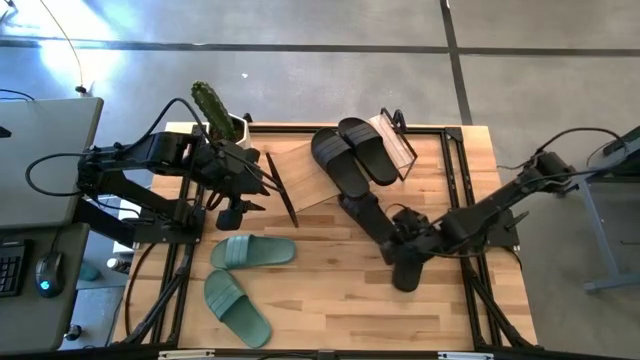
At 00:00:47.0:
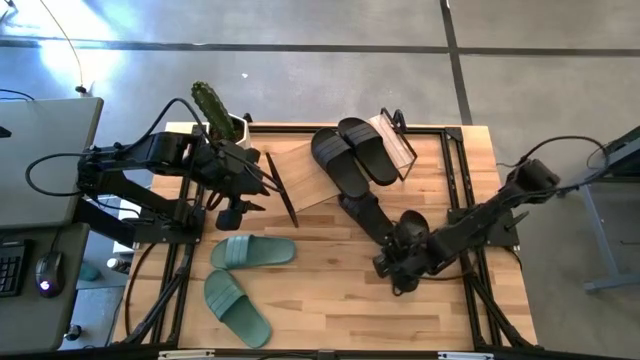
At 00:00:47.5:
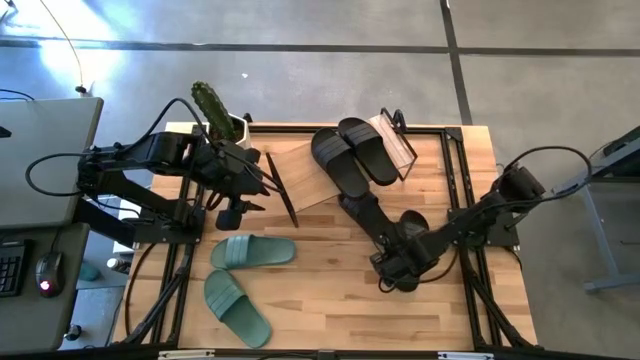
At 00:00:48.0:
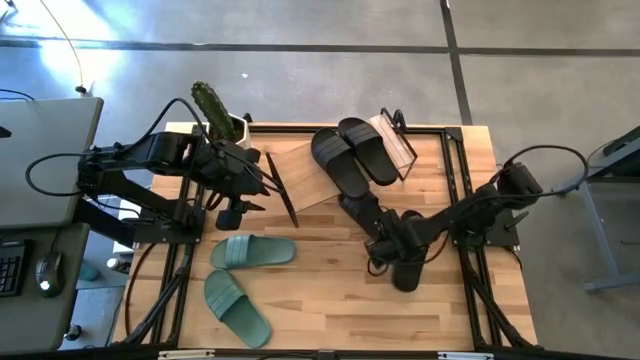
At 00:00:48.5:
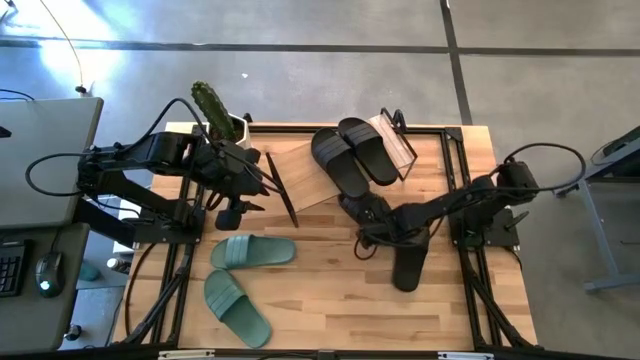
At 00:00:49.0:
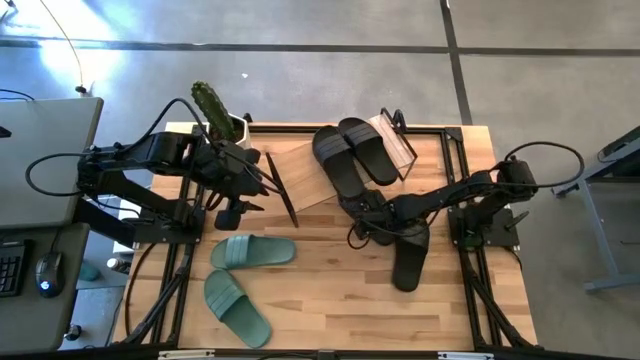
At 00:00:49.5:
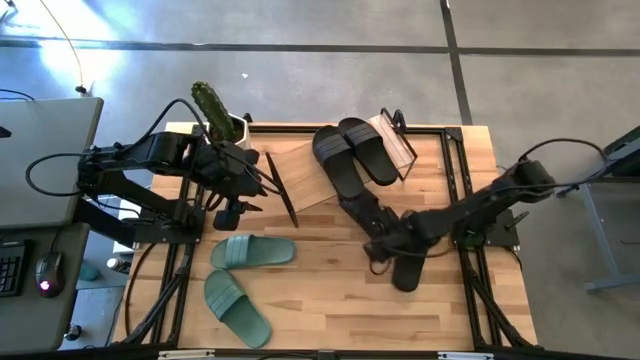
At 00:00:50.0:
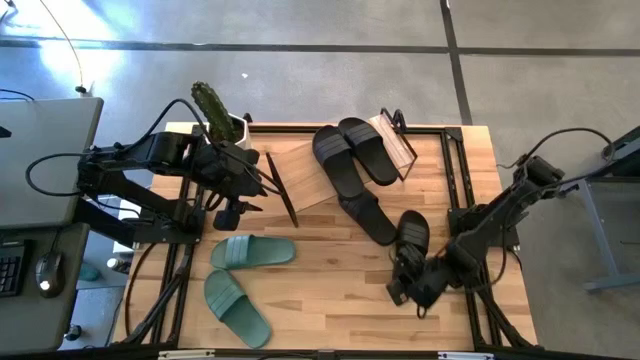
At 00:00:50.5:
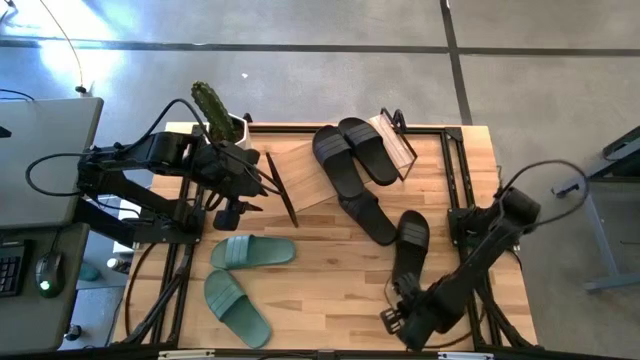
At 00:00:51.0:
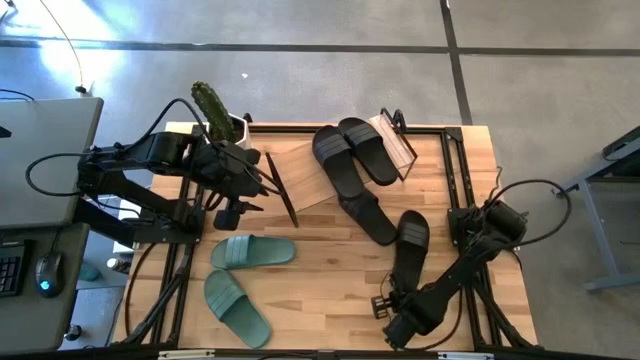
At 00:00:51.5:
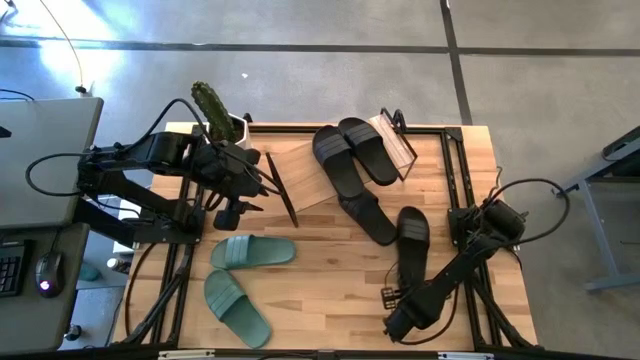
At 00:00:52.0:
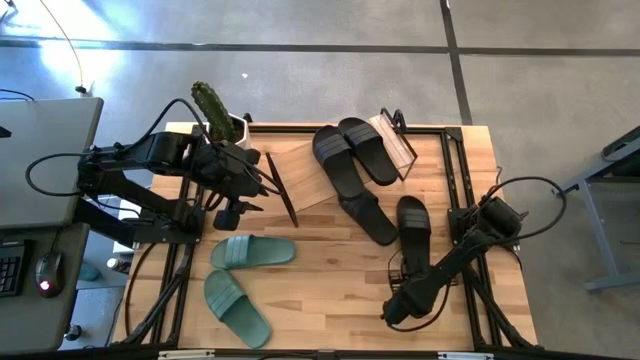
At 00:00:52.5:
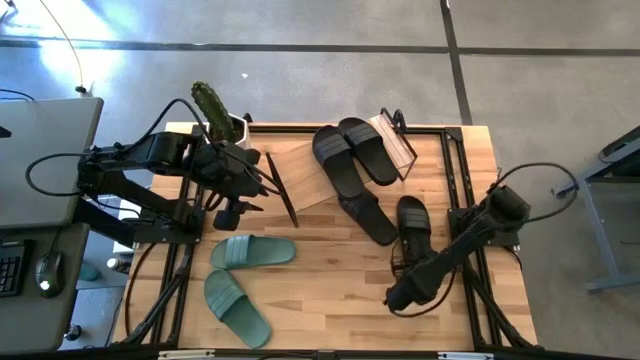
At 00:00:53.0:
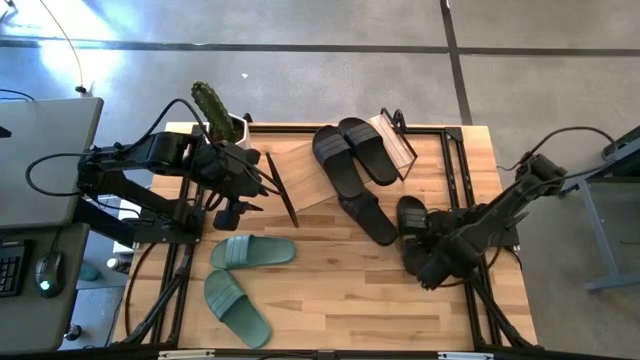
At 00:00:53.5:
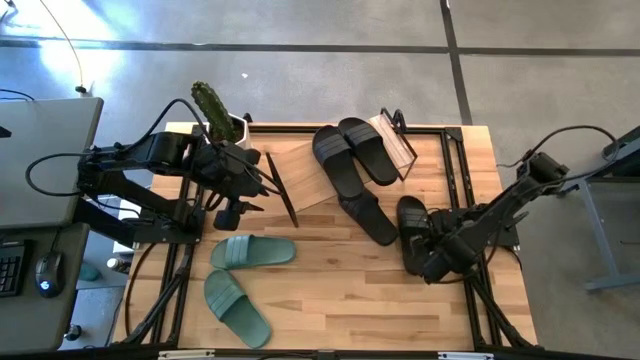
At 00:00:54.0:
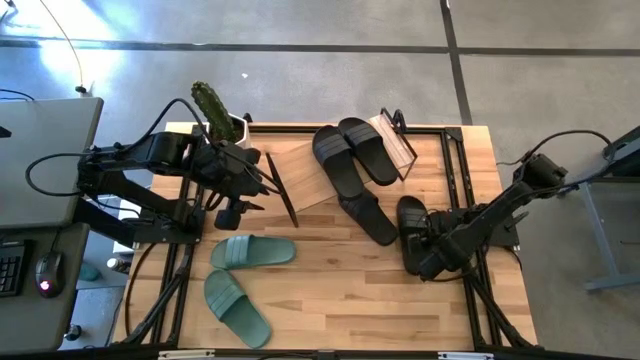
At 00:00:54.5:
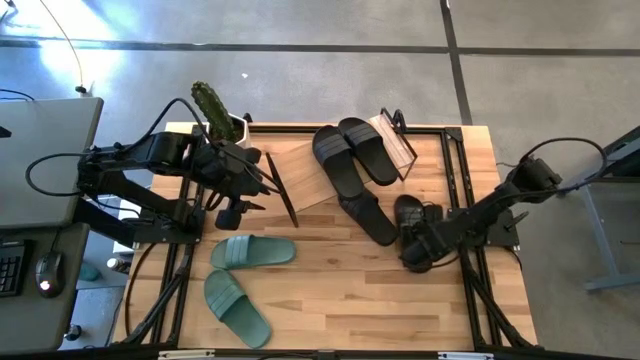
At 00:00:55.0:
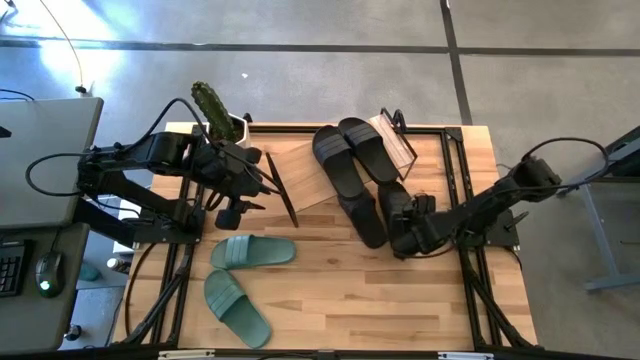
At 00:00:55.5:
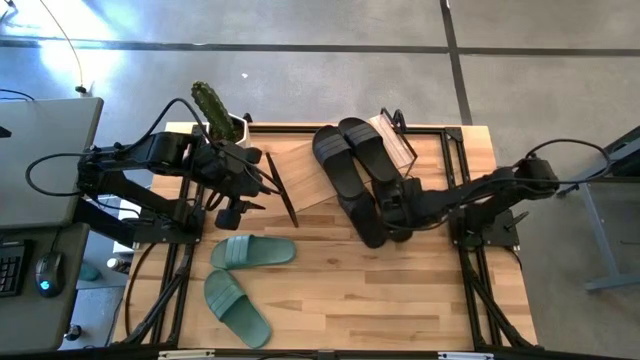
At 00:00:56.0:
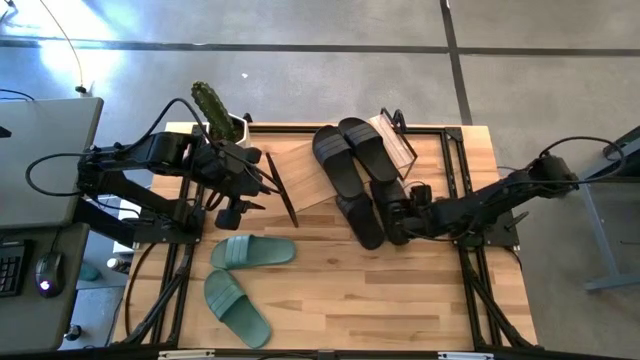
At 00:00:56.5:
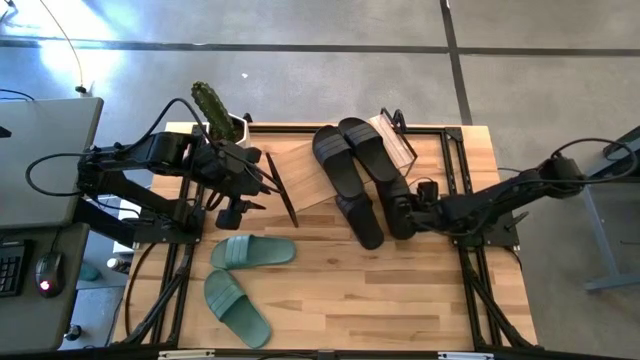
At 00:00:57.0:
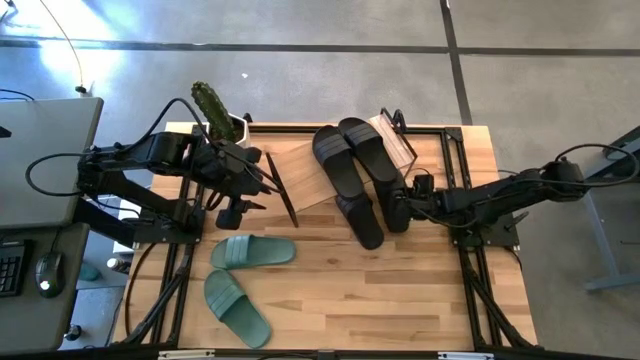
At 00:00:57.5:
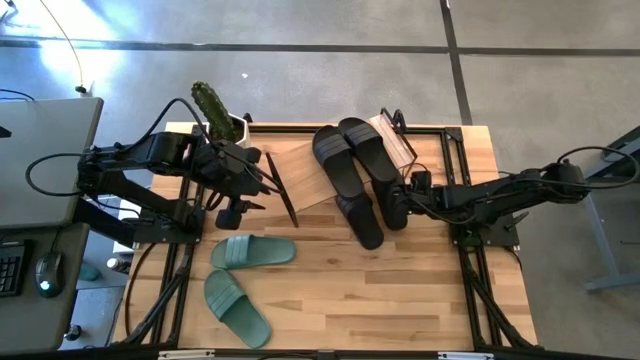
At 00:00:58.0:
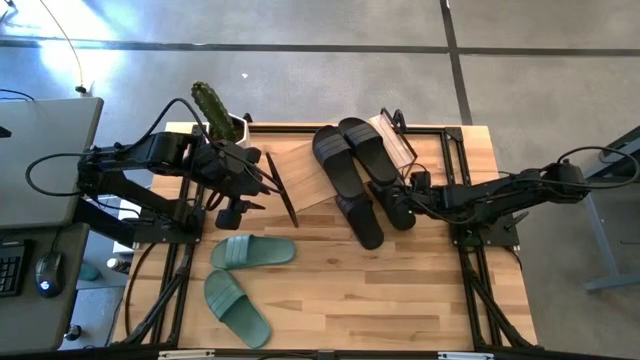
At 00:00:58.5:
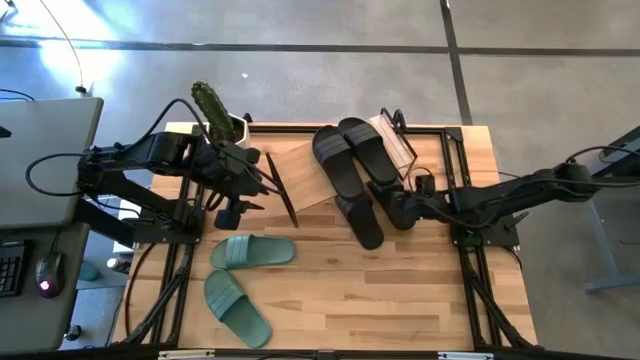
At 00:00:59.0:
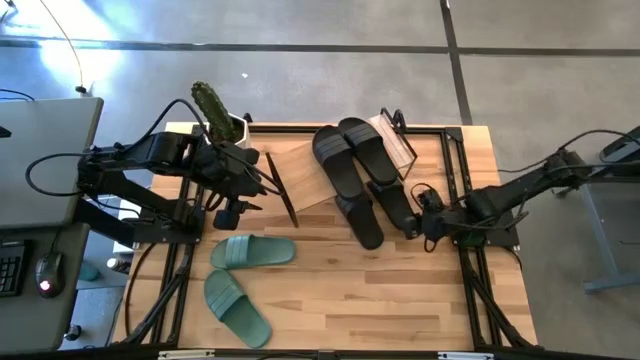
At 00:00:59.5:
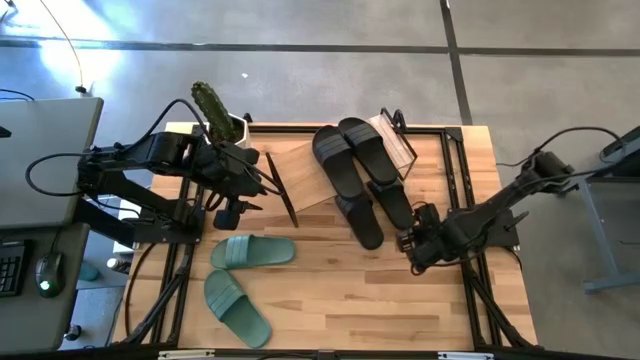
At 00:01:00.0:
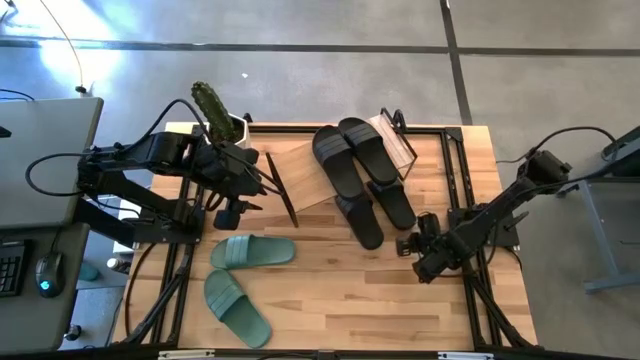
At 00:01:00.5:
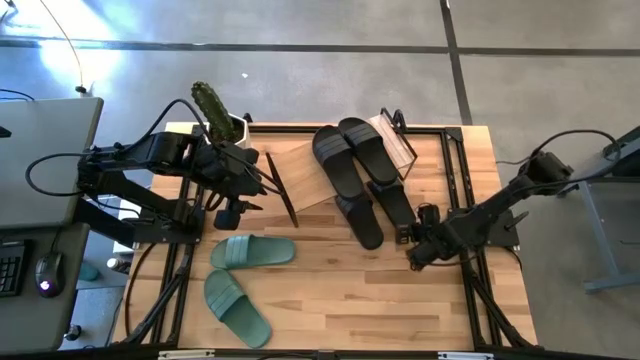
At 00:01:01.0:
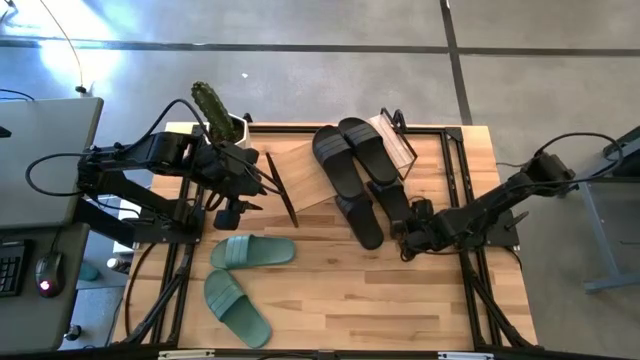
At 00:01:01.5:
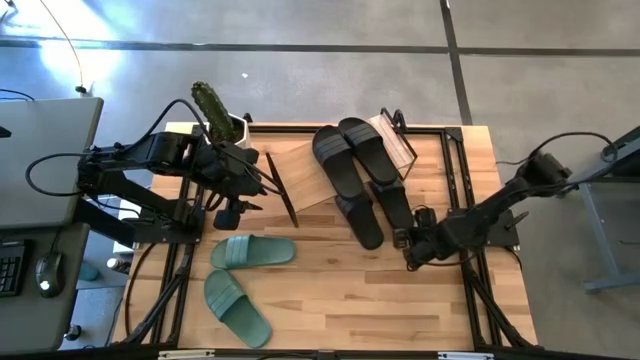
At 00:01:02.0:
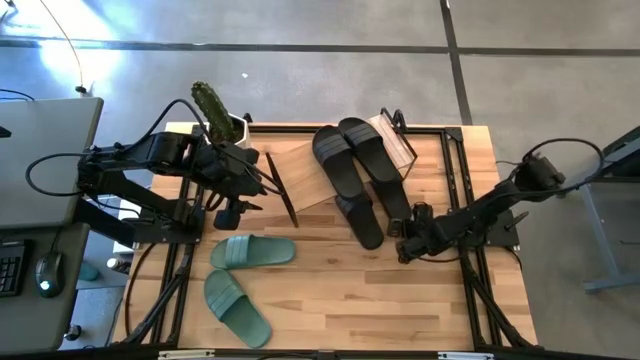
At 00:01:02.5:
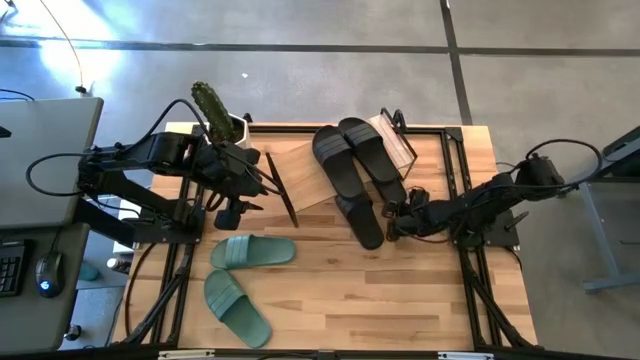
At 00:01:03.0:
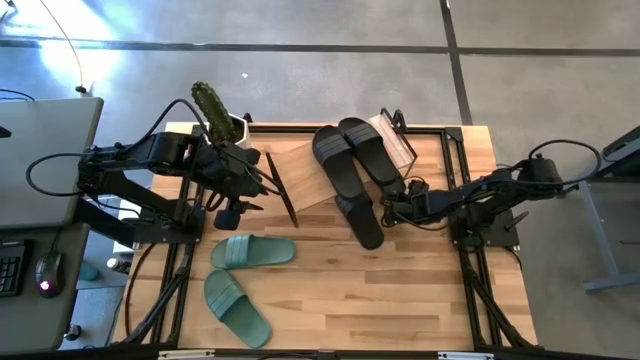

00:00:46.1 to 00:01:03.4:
Task: Pick and place slides into the shelf
Put the black slipper under the shelf

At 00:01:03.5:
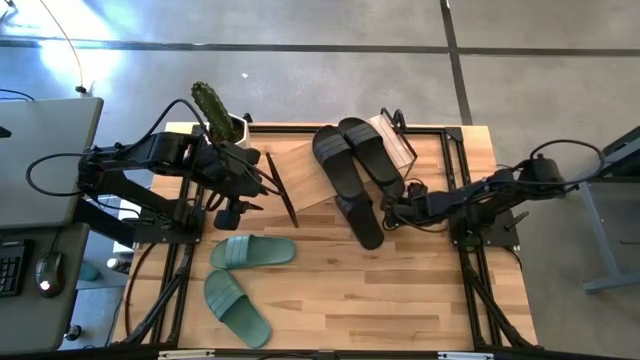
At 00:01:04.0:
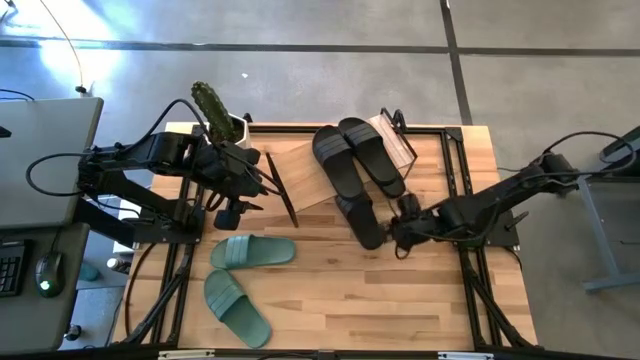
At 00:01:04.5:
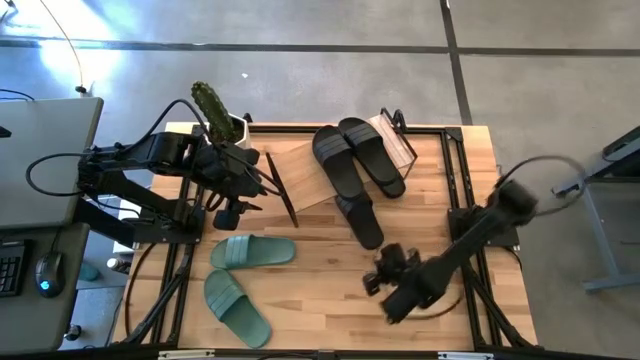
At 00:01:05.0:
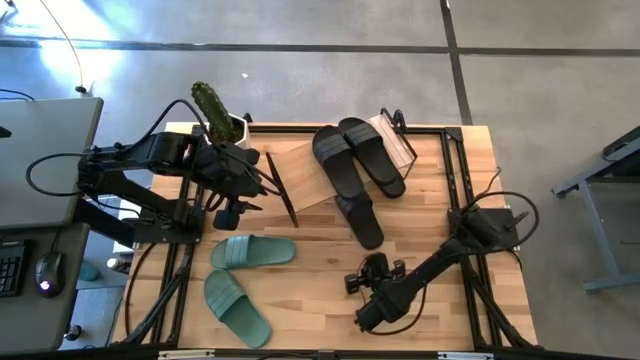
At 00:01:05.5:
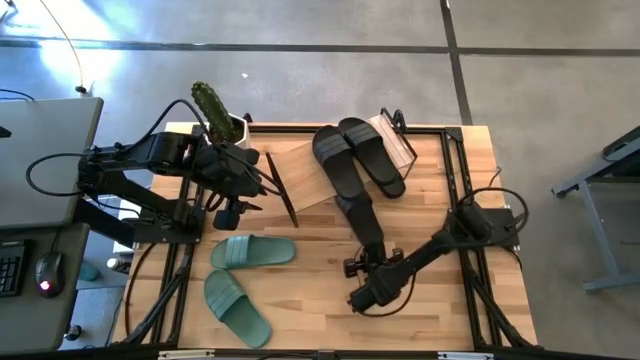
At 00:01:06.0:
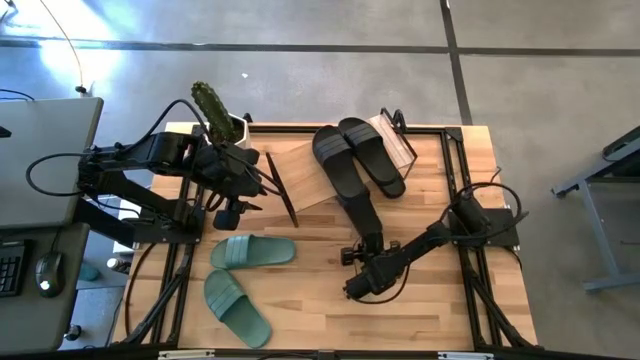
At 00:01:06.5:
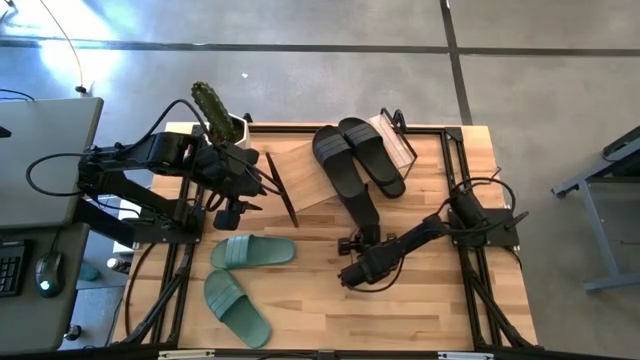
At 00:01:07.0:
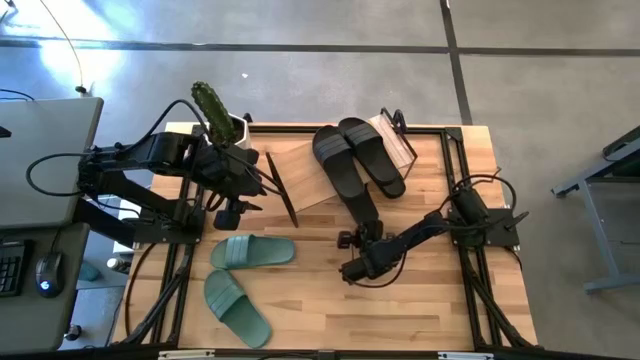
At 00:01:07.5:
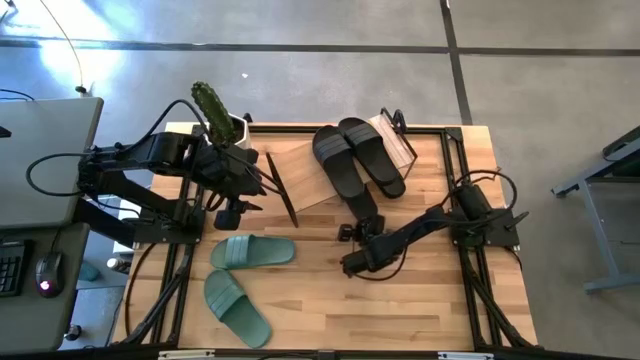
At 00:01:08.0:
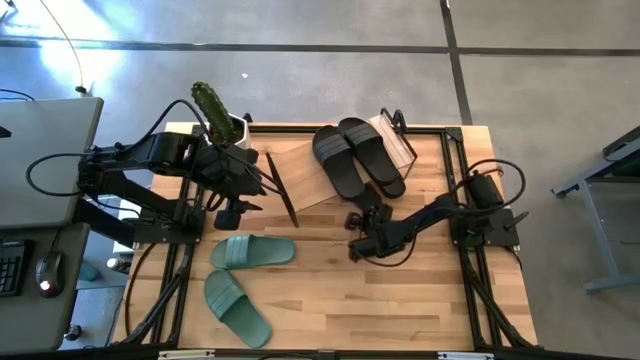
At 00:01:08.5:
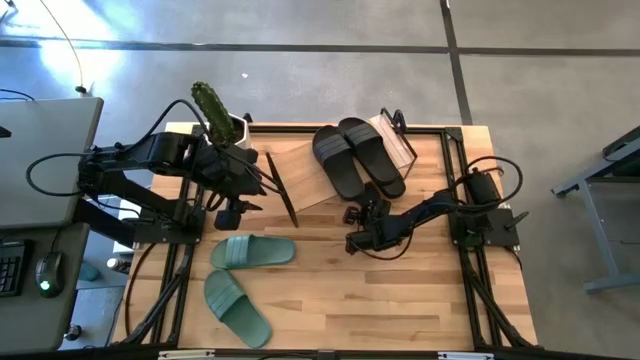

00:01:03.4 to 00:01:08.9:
Adjust the black slipper
